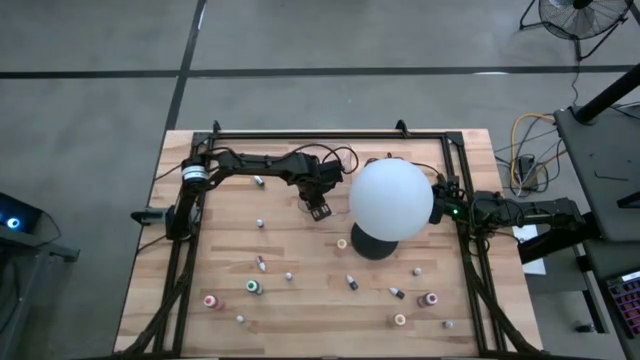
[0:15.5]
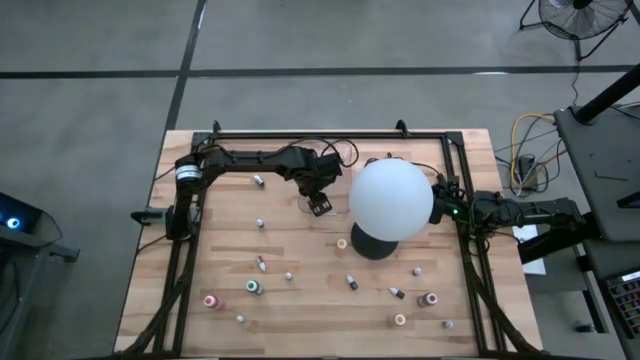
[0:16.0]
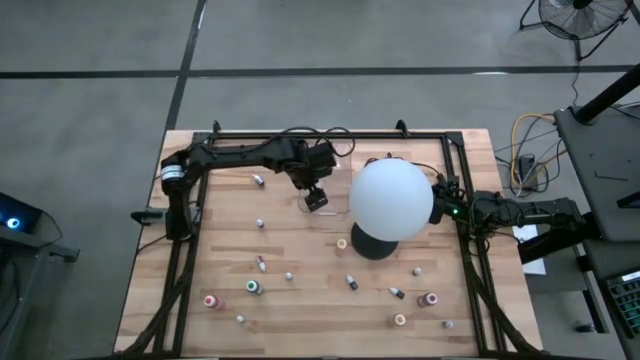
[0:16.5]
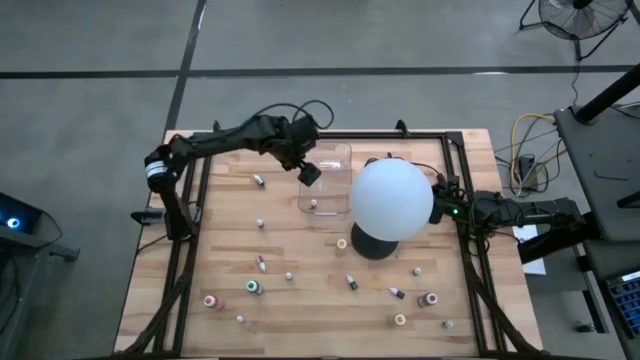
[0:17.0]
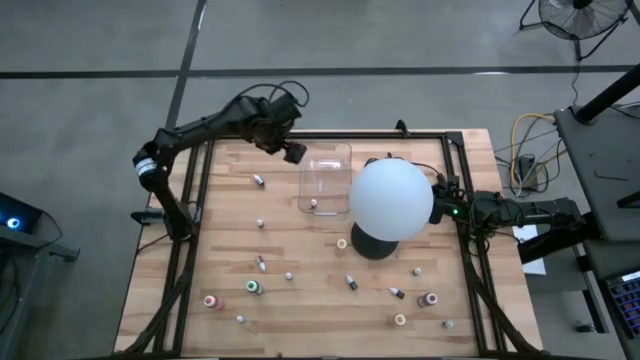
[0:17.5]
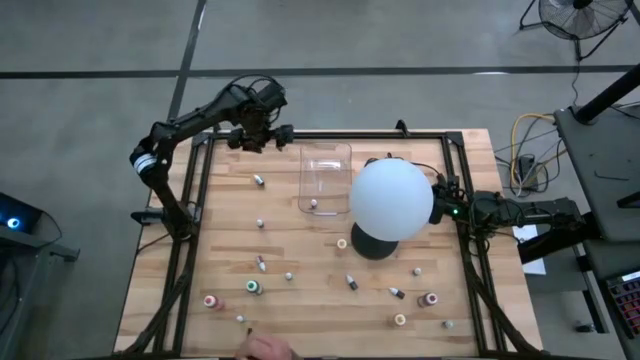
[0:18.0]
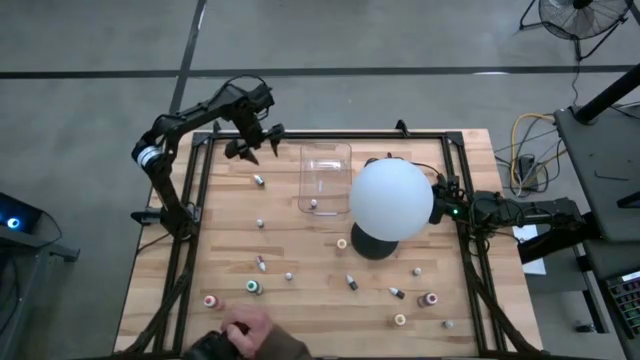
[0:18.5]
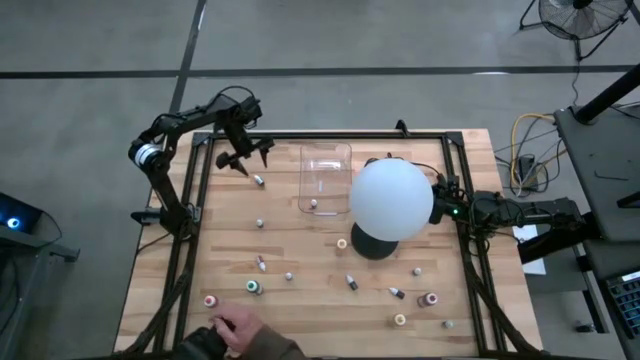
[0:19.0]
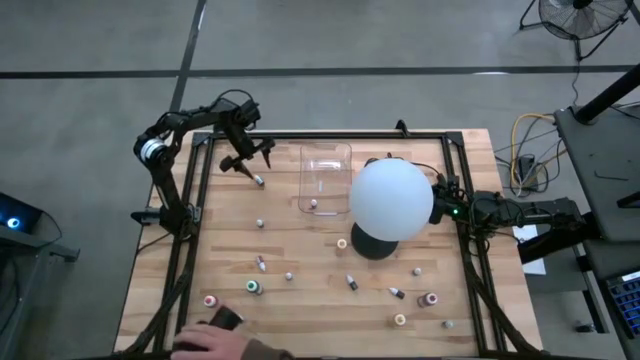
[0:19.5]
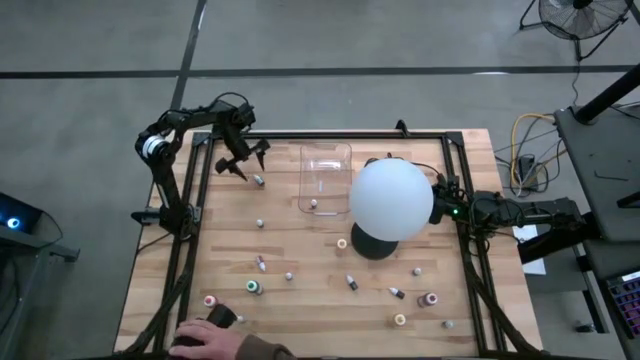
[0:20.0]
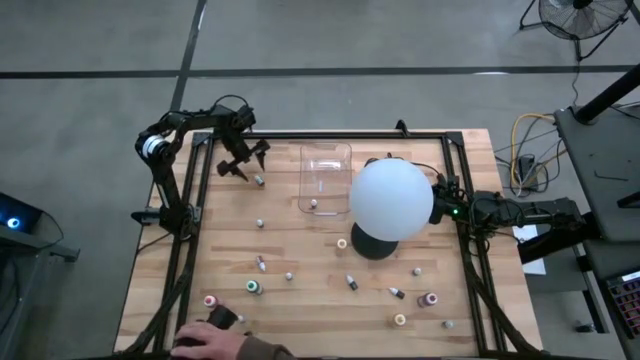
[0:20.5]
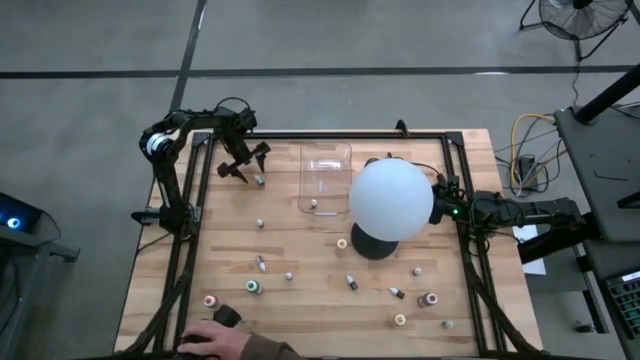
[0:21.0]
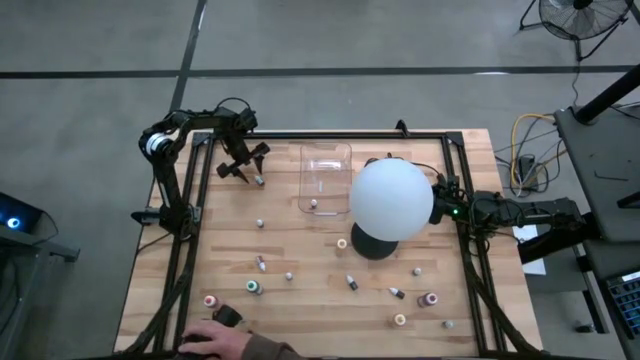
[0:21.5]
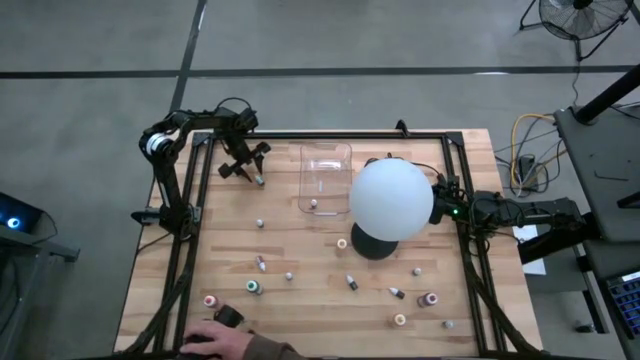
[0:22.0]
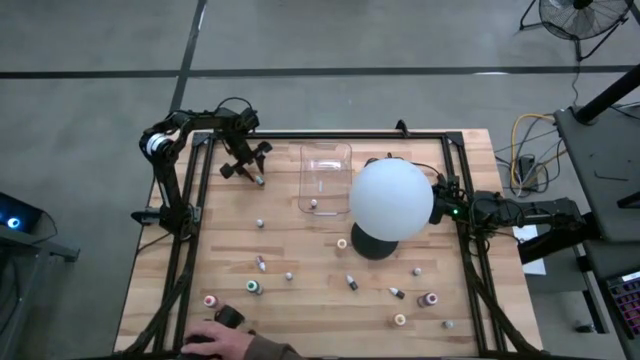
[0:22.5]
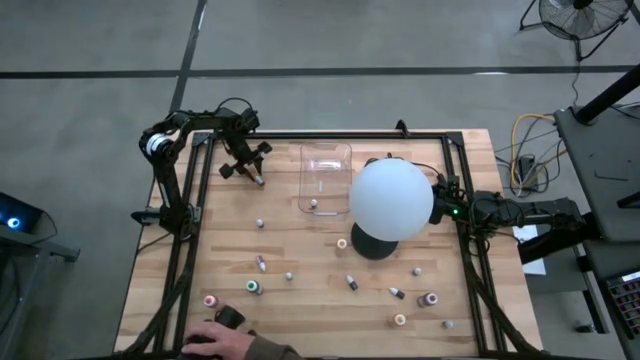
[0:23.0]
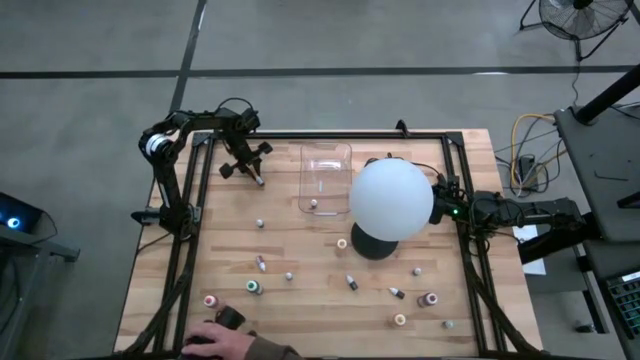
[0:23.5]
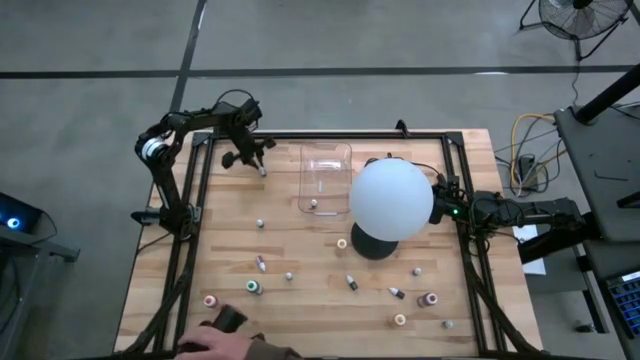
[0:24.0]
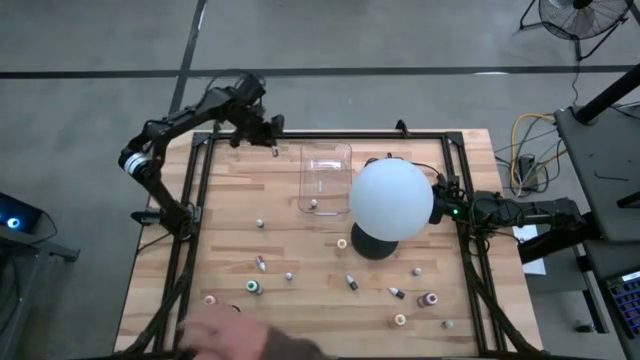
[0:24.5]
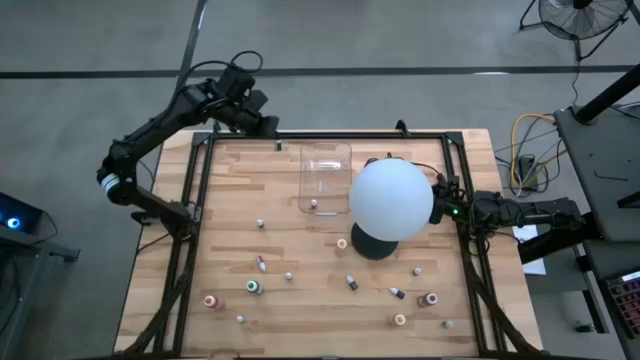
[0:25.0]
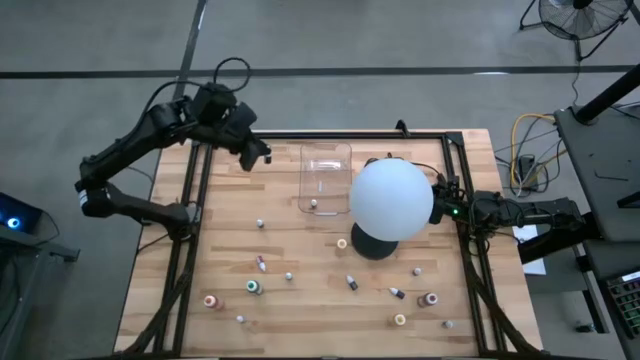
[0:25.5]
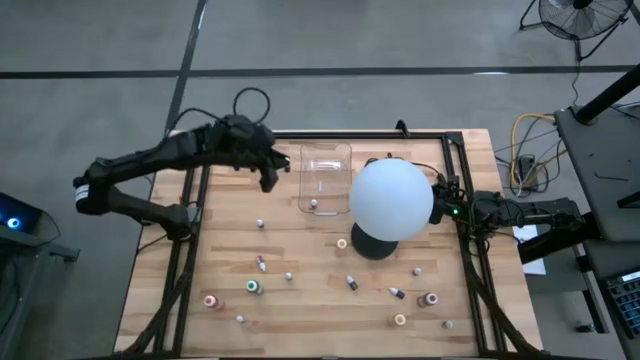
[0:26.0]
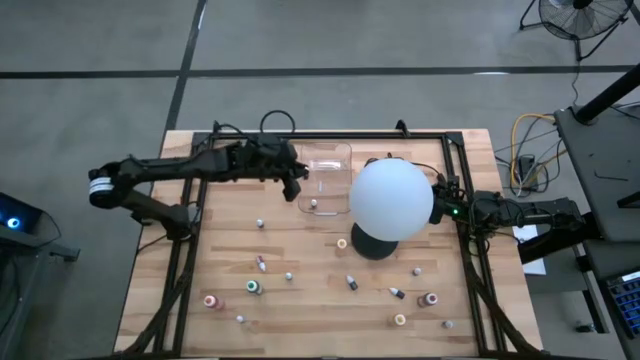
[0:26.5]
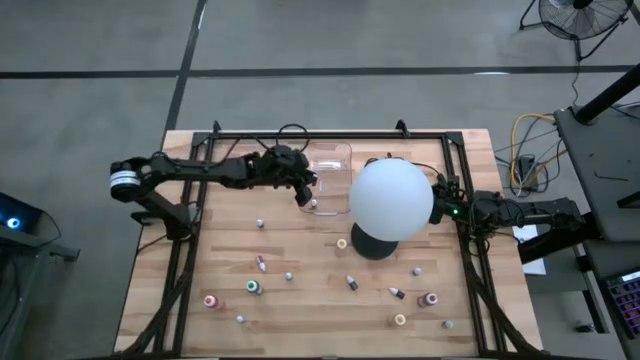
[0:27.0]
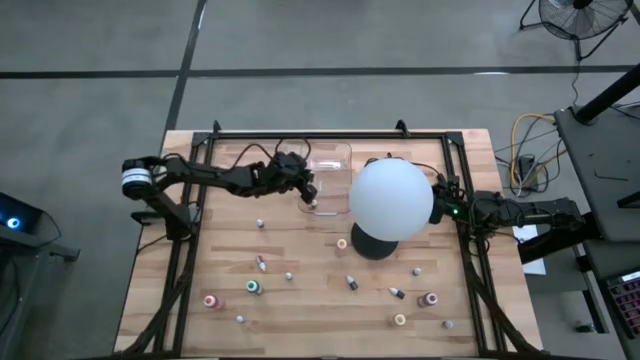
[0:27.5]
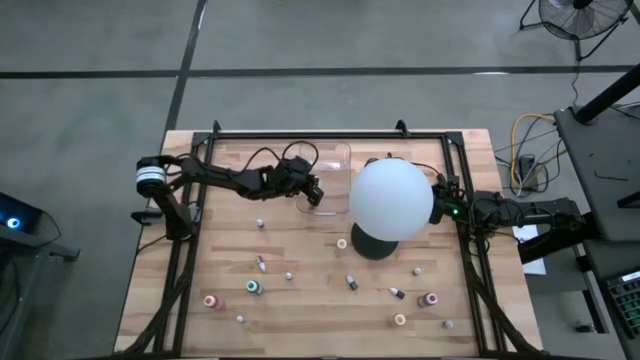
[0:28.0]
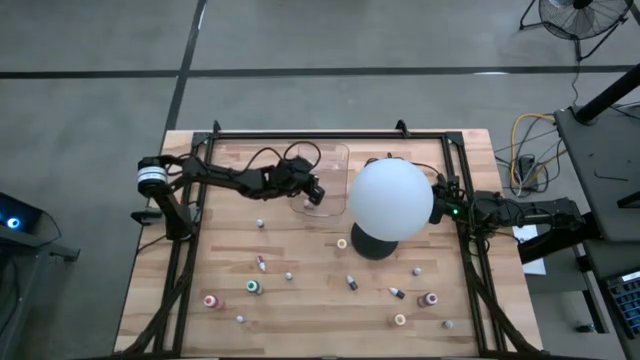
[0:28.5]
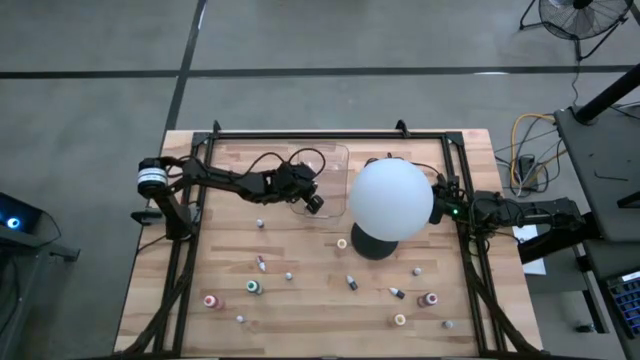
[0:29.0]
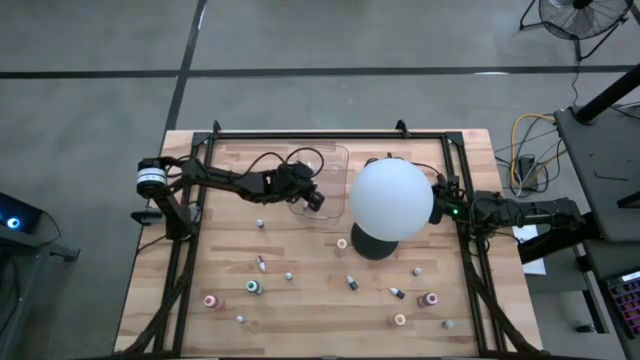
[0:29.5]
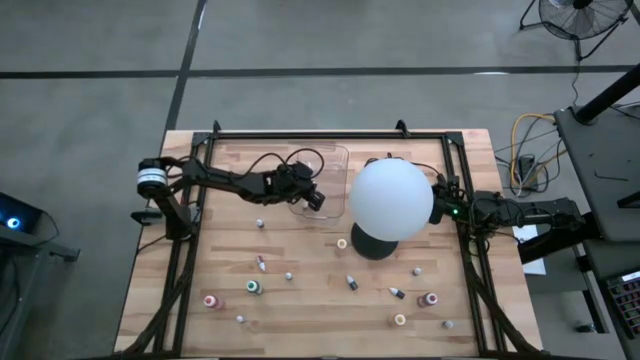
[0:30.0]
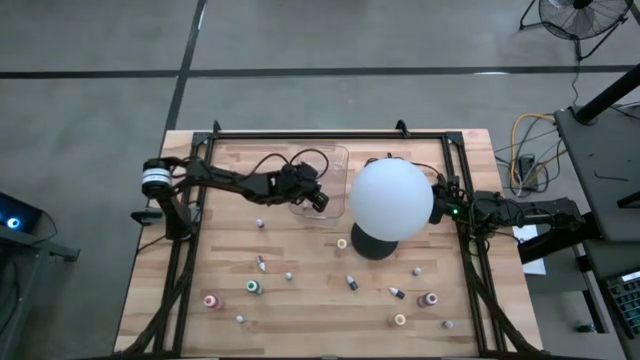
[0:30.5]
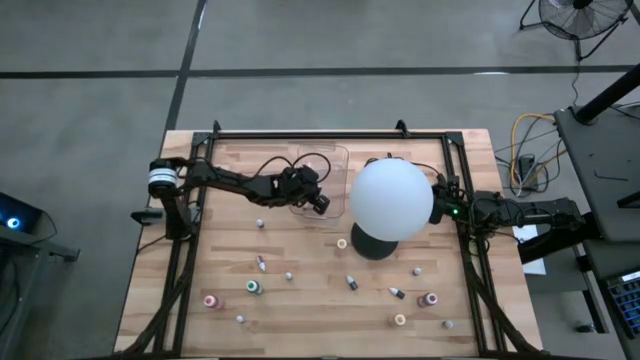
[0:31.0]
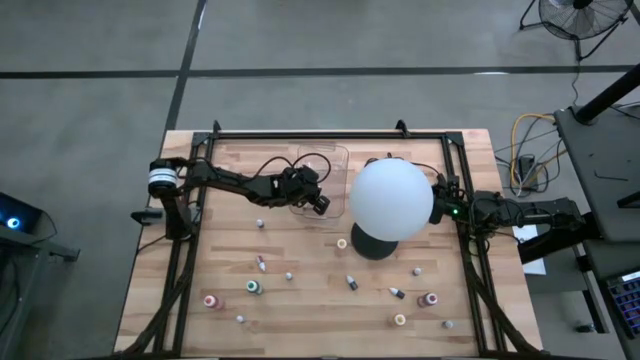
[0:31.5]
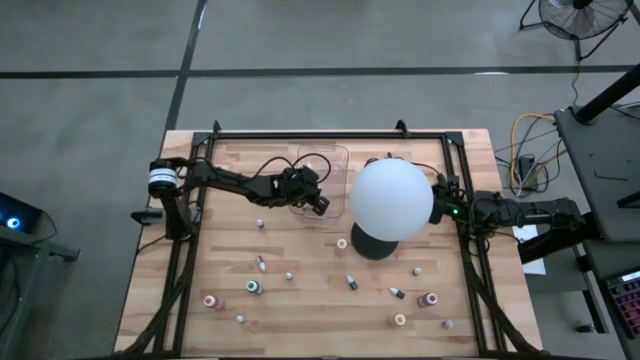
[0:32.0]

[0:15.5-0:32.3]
Task: Pick & Place food coloring
Put the small white food coloring bottle into the transparent bin
